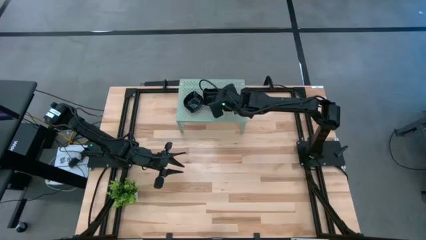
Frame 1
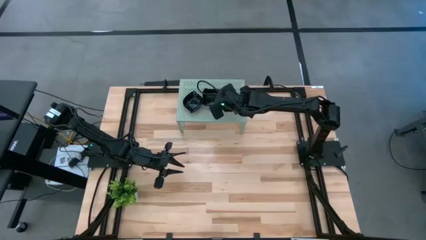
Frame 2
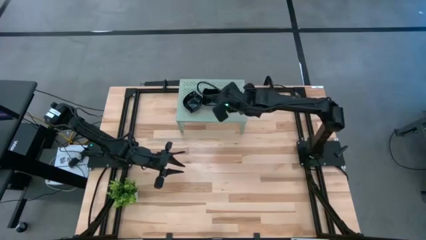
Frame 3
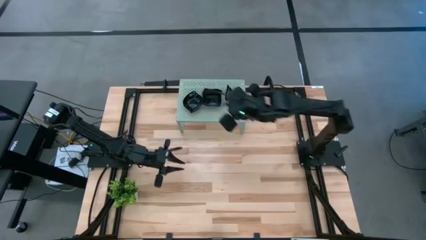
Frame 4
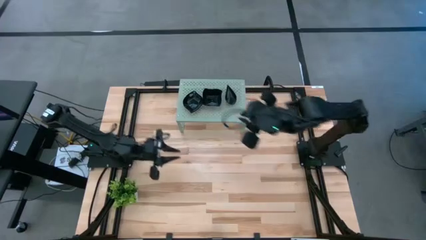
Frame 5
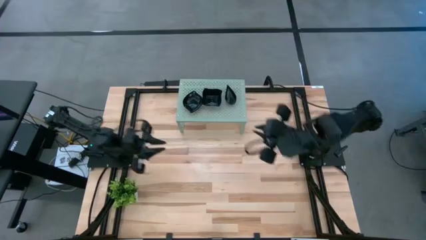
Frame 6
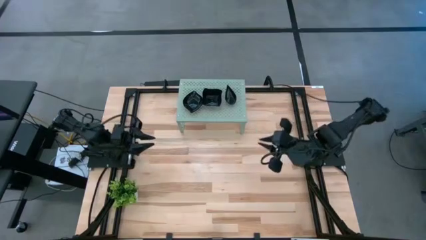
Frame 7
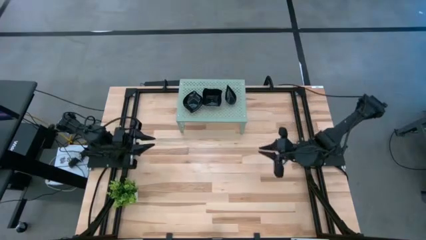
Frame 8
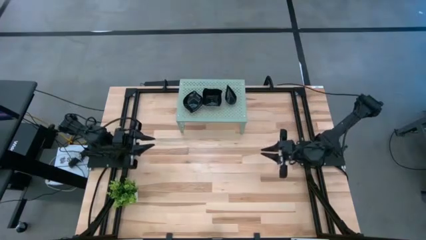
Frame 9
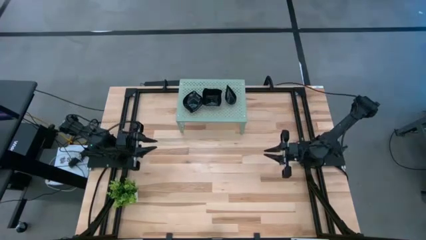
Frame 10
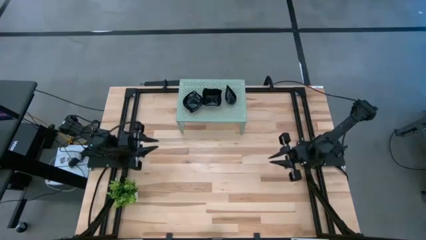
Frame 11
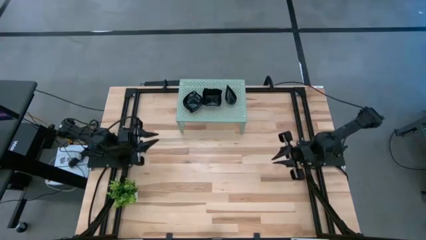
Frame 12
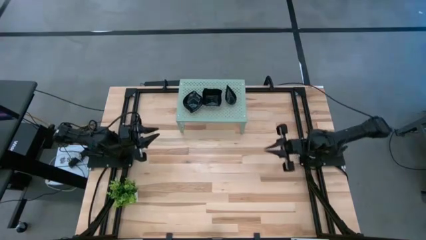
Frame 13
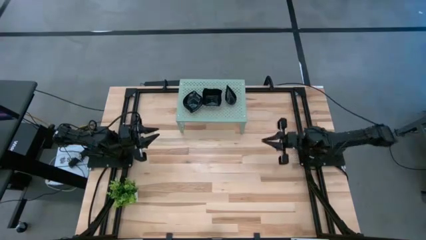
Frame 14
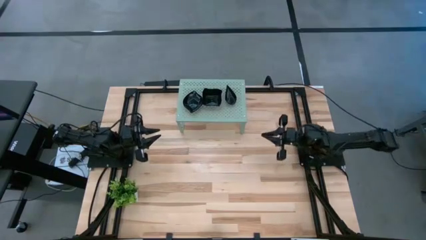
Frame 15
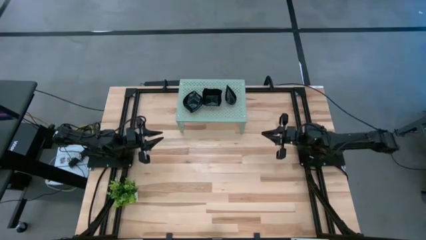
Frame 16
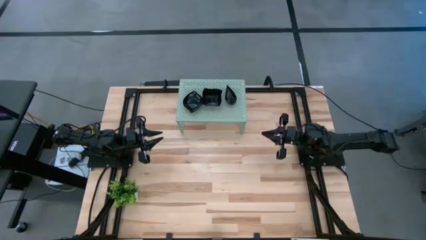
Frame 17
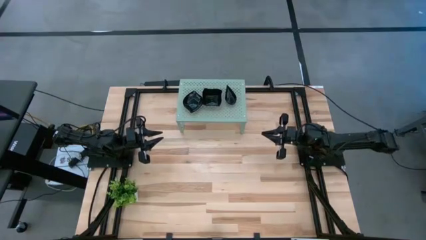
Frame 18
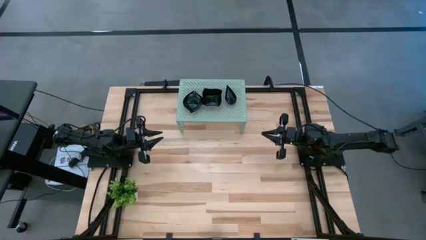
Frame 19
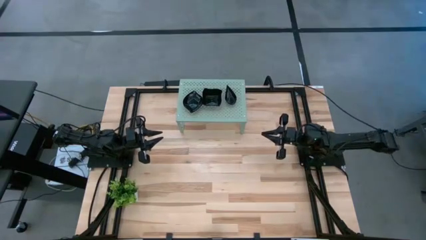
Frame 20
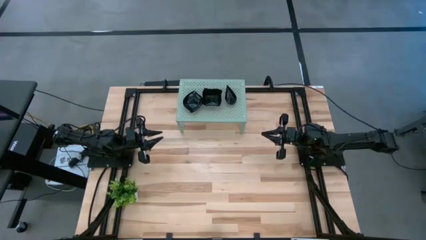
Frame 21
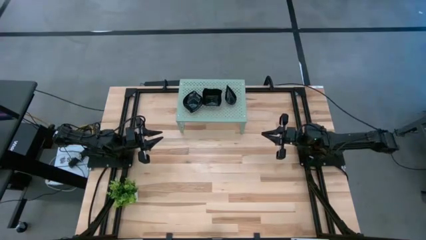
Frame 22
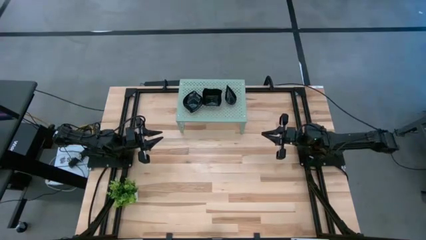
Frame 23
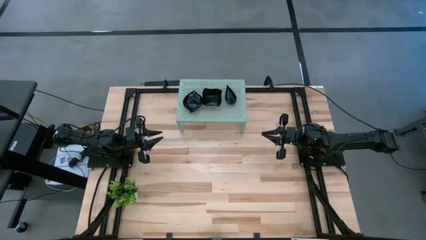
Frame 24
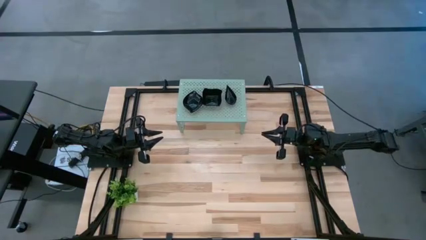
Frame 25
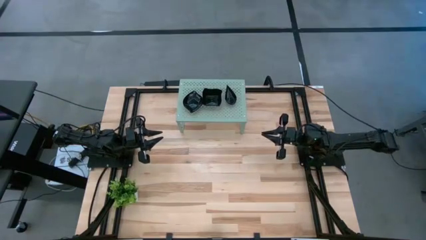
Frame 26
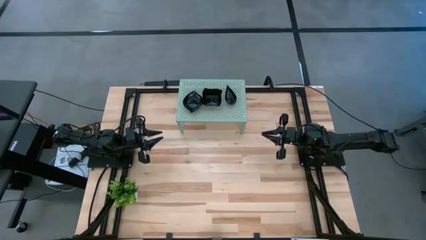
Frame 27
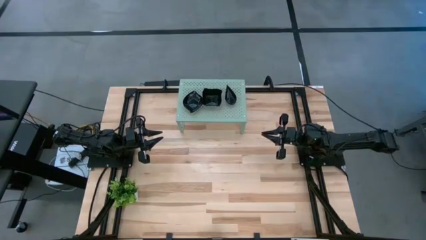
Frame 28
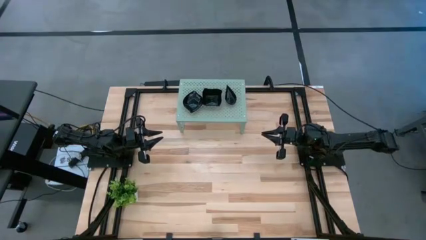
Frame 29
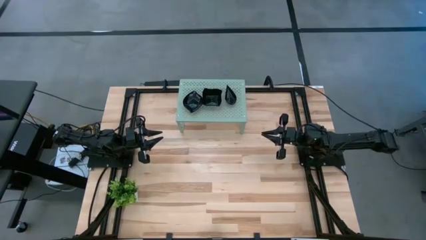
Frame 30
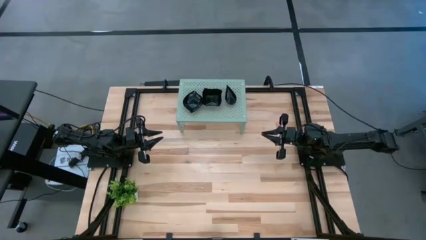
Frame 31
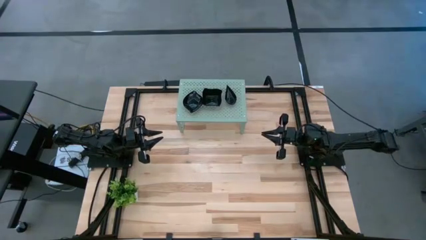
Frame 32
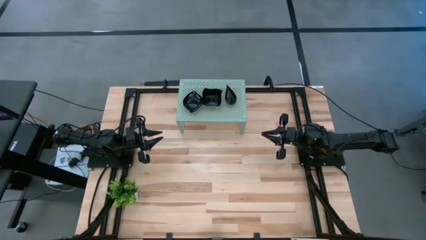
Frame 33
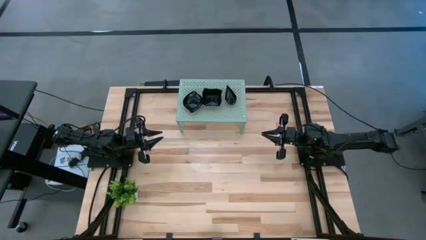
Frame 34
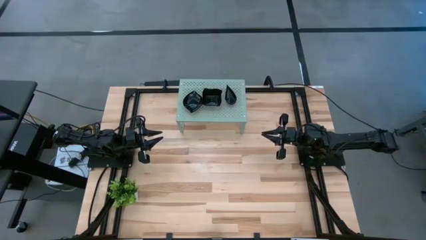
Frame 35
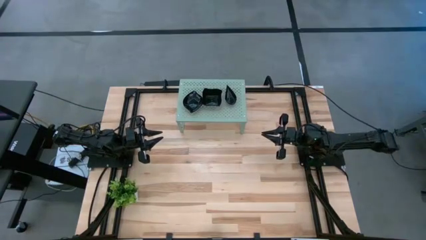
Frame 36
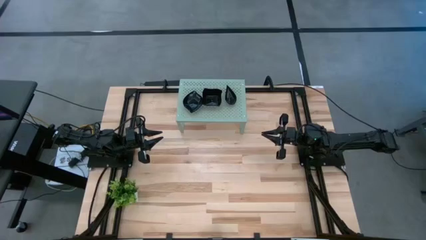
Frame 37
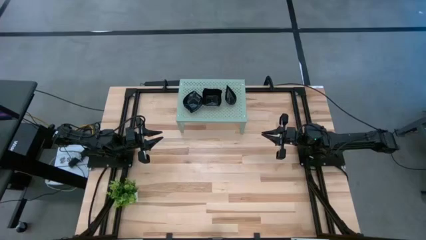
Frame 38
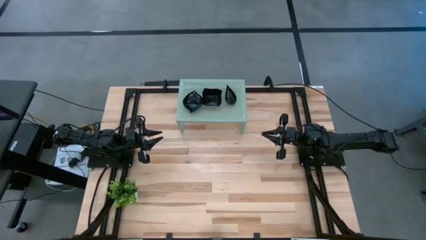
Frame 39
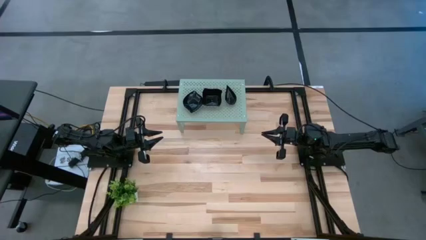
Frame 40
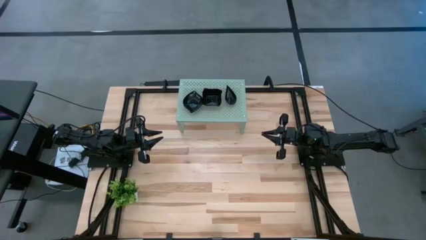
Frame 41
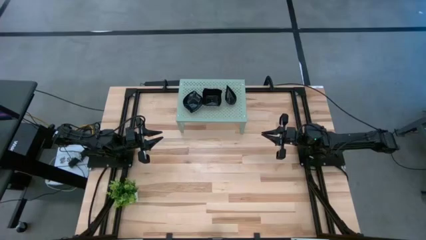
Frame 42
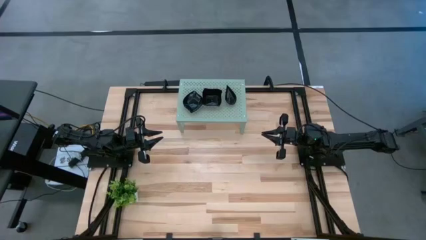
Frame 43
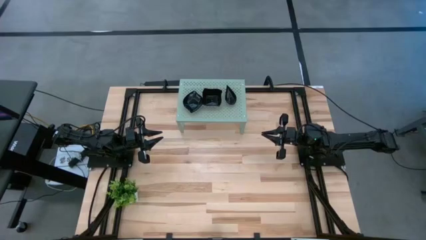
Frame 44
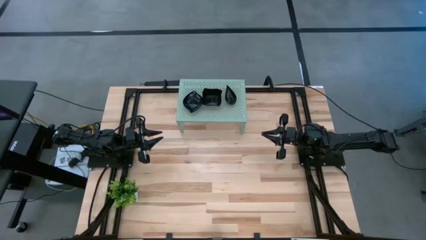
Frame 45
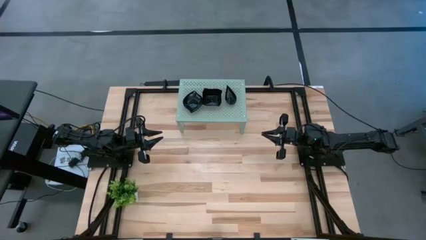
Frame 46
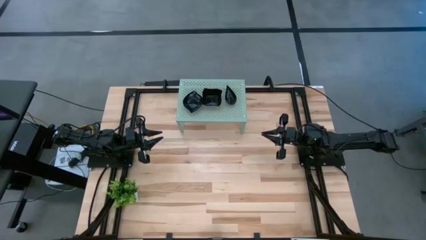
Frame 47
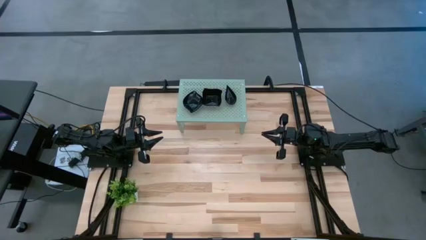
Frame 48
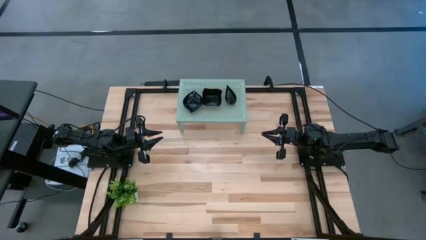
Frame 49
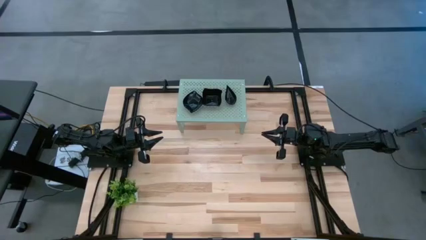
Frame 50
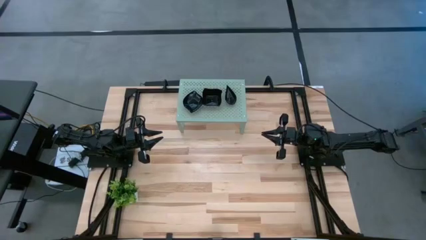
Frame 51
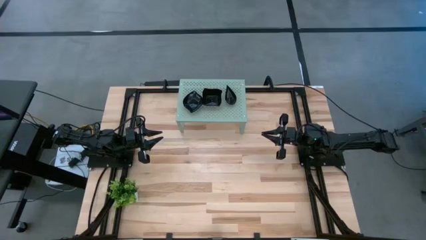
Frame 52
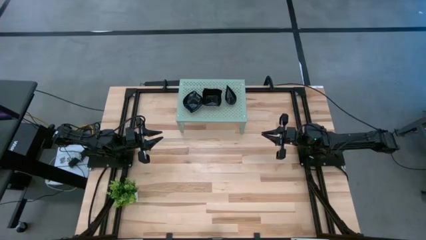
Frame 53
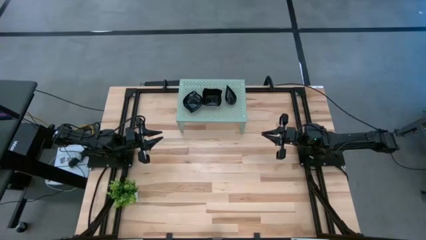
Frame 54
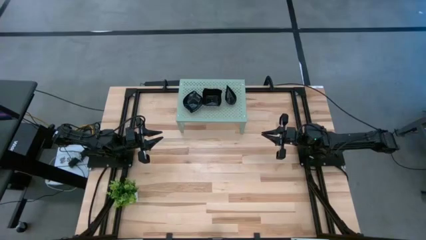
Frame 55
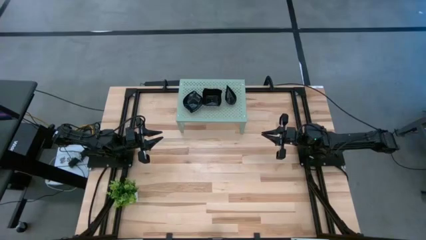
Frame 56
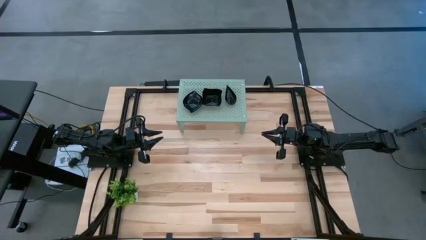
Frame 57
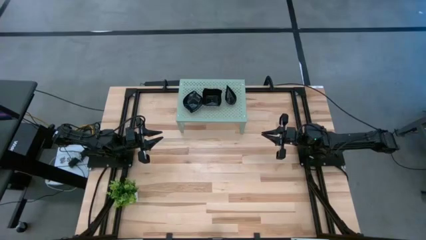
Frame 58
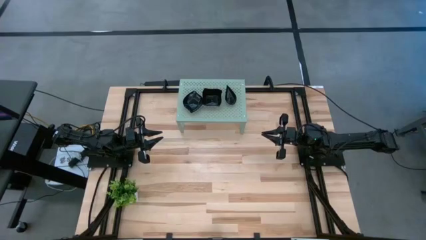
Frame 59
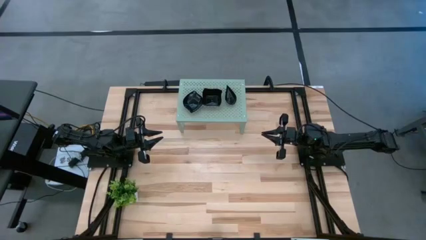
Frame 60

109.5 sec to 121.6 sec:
Task: Pick & Place Mini shaped plates
Return to Home Position
